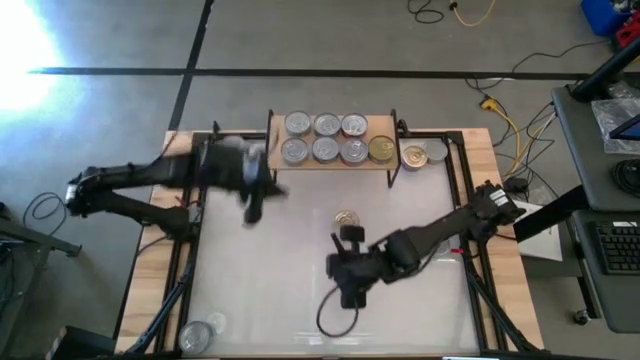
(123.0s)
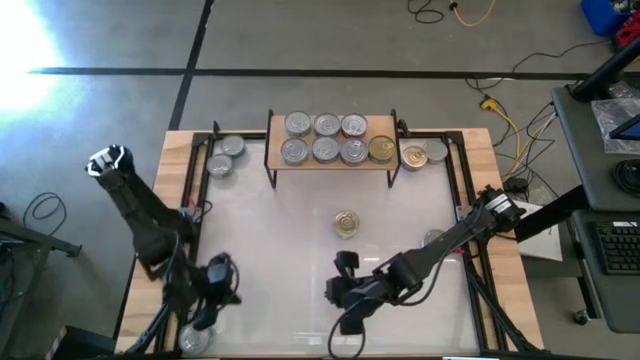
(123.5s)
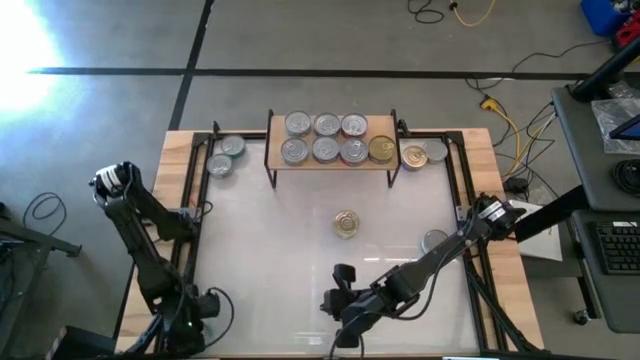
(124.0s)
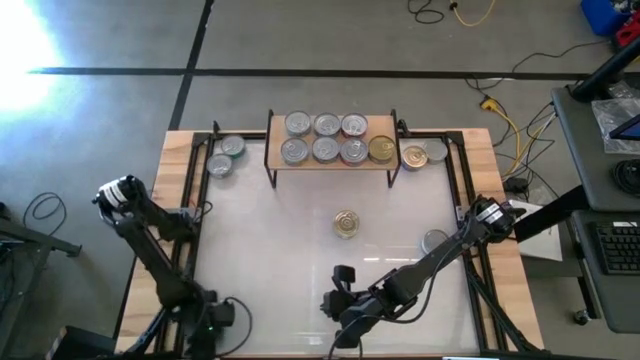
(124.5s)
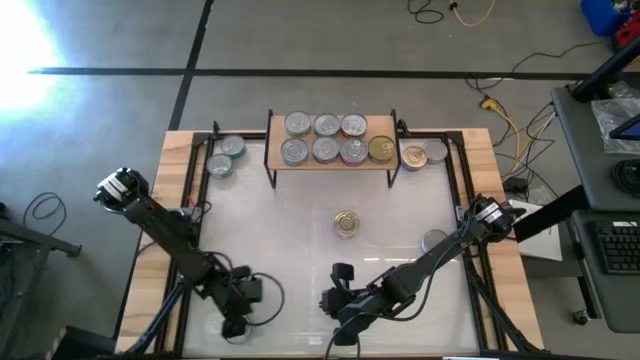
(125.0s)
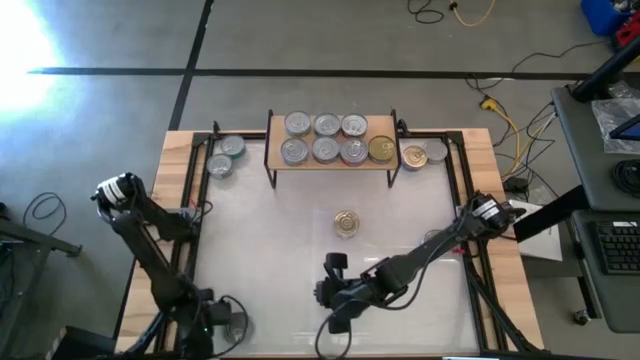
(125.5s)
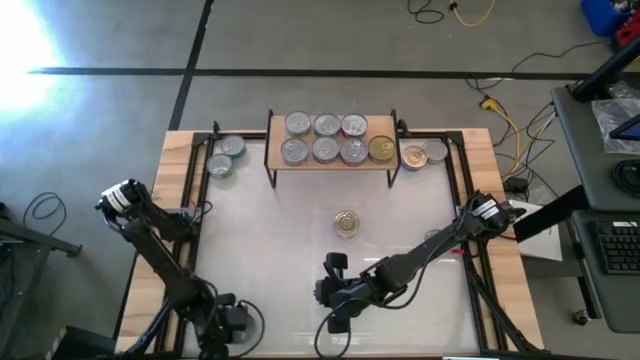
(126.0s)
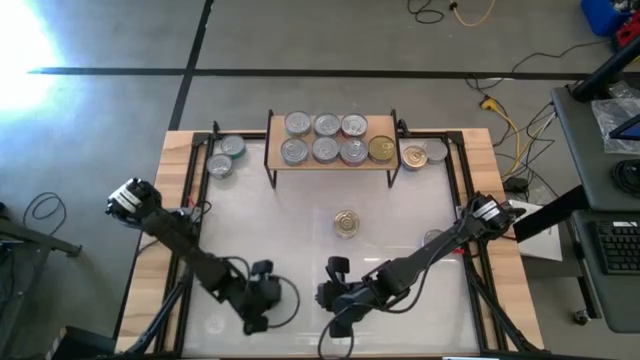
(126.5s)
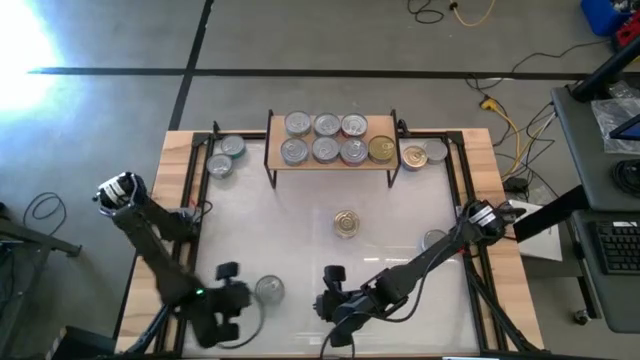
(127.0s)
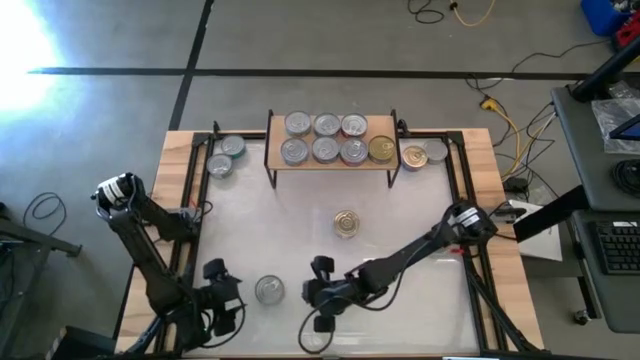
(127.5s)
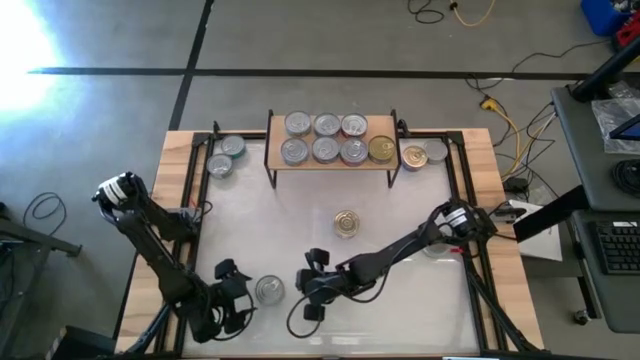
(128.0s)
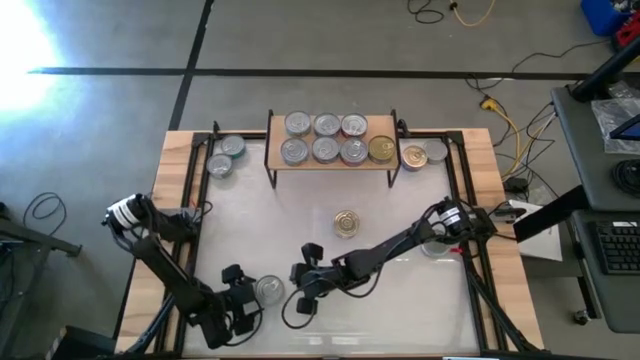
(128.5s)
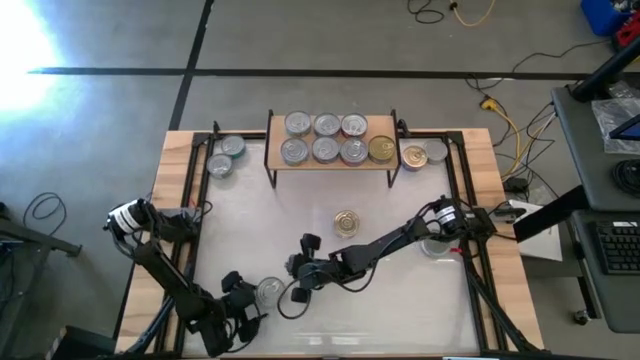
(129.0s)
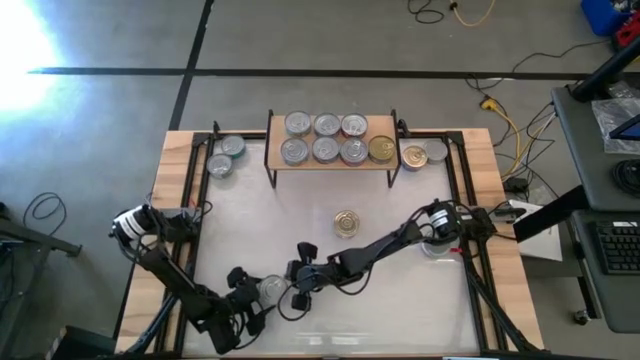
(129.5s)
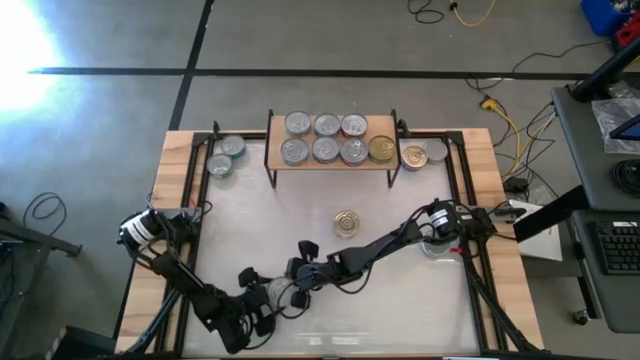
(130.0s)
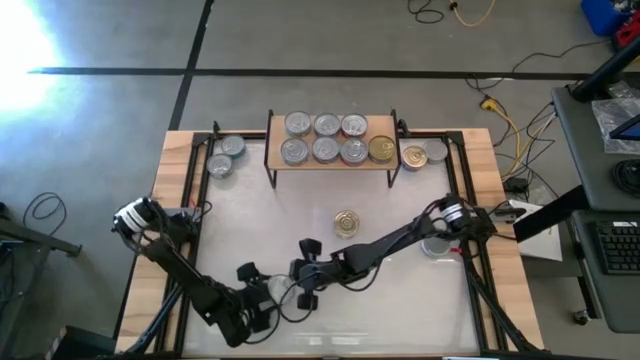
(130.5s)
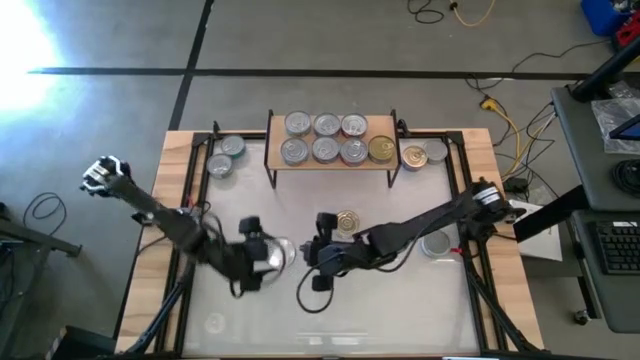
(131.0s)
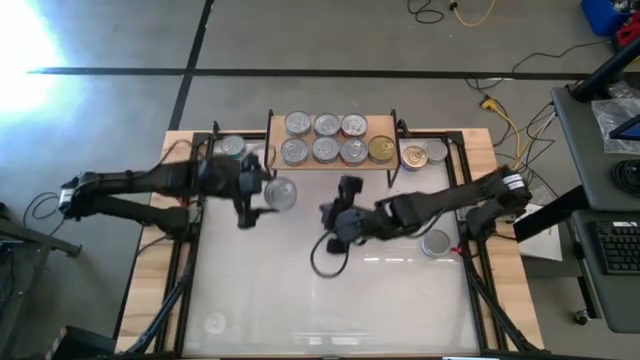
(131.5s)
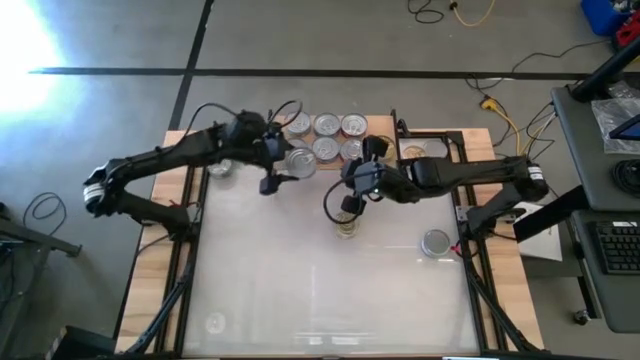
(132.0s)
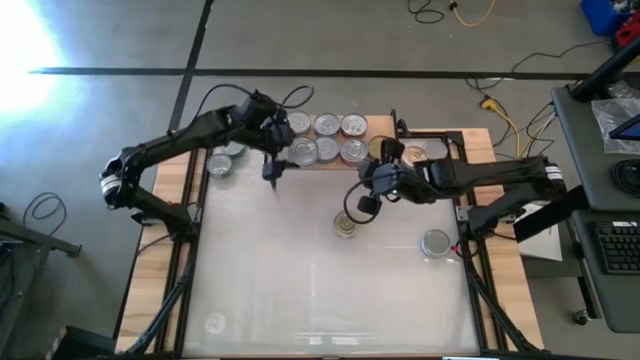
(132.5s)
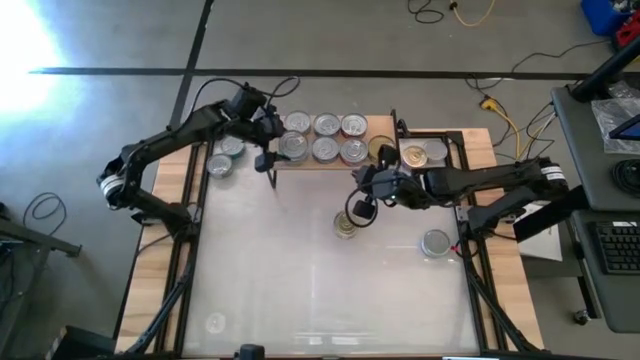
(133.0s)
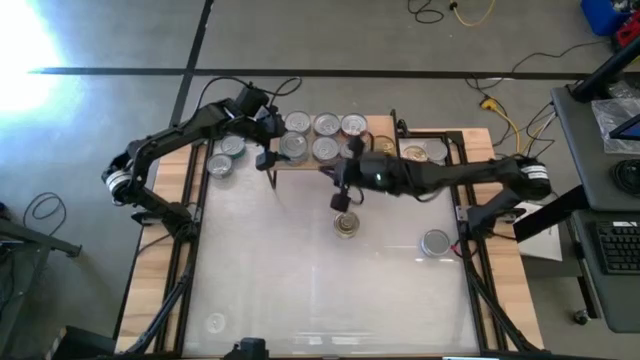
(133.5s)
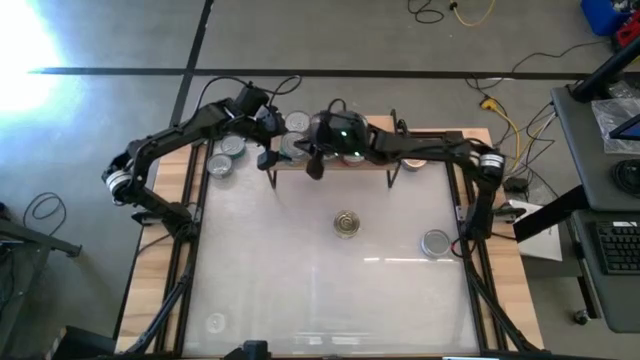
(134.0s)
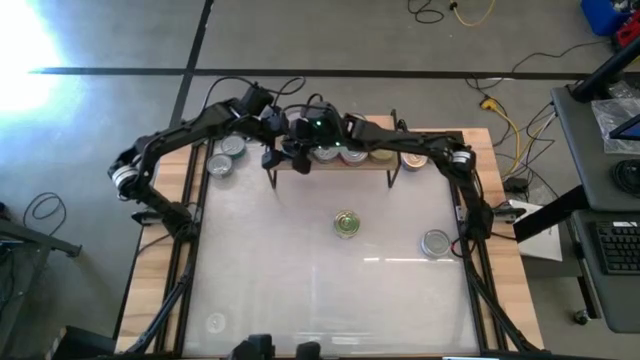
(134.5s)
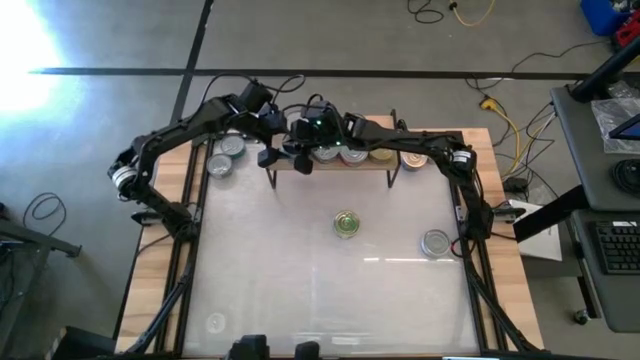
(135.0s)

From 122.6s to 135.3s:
Task: Stack canned seafood by type on shelf
Stack the bottom yellow-blue tuna can on top of the other yellow-blue tuna can on the shelf

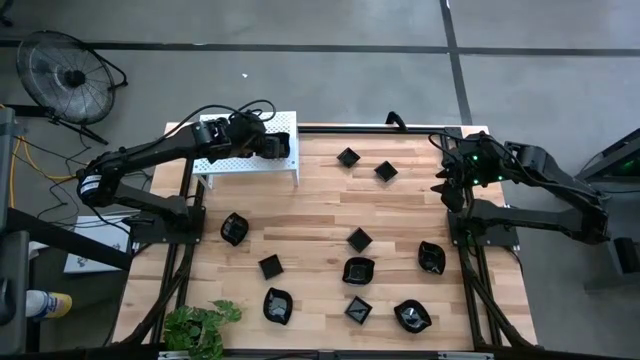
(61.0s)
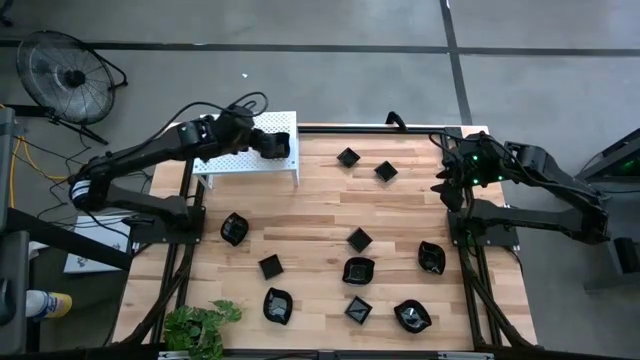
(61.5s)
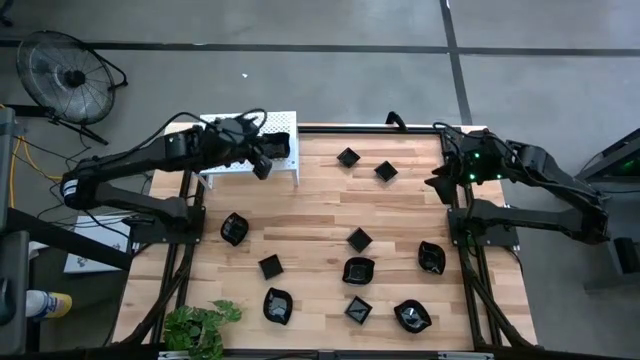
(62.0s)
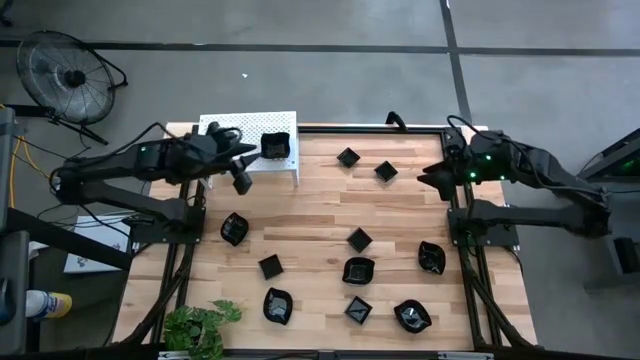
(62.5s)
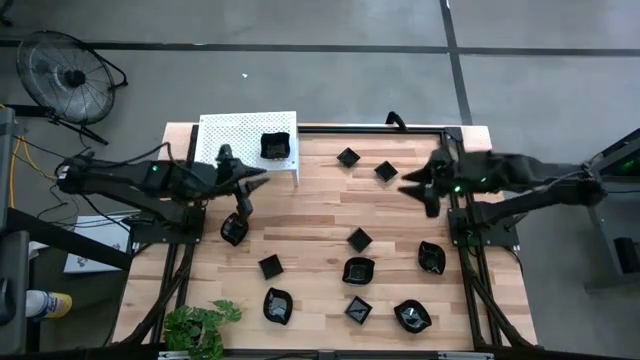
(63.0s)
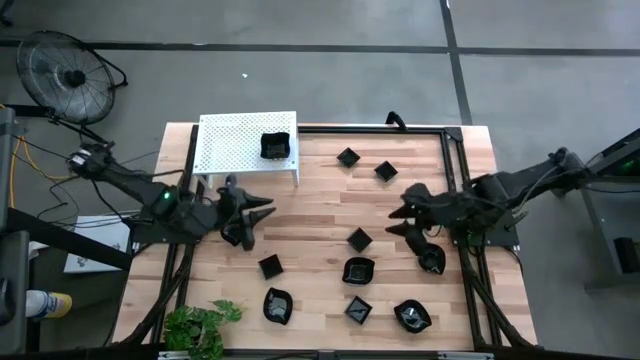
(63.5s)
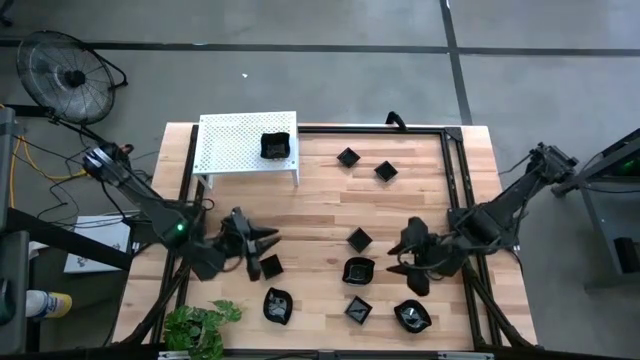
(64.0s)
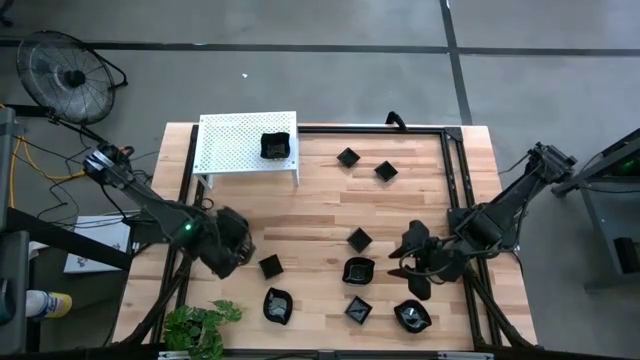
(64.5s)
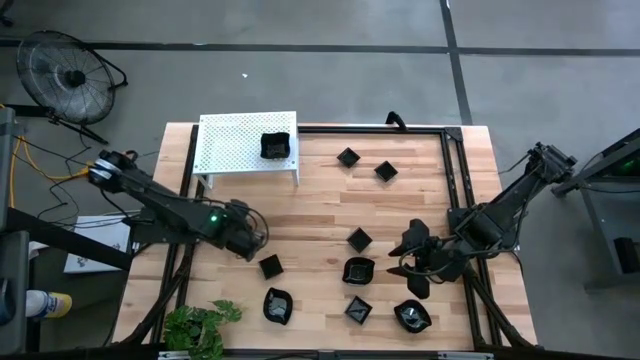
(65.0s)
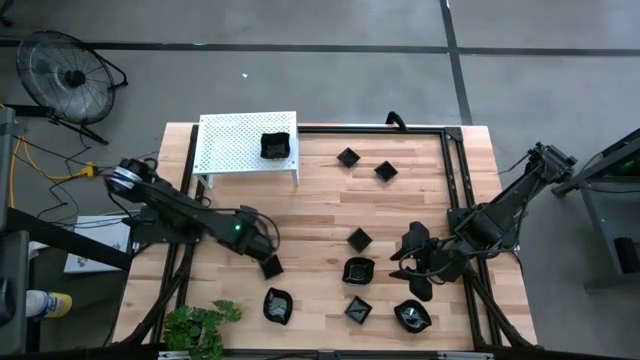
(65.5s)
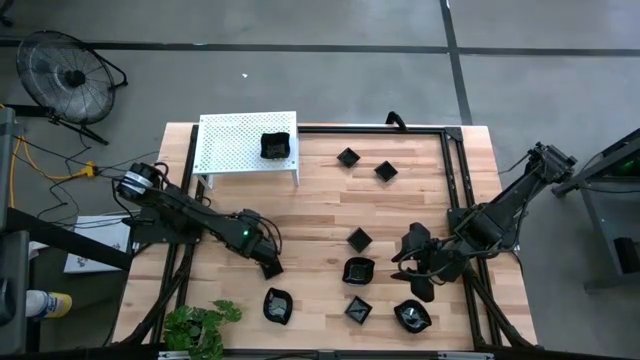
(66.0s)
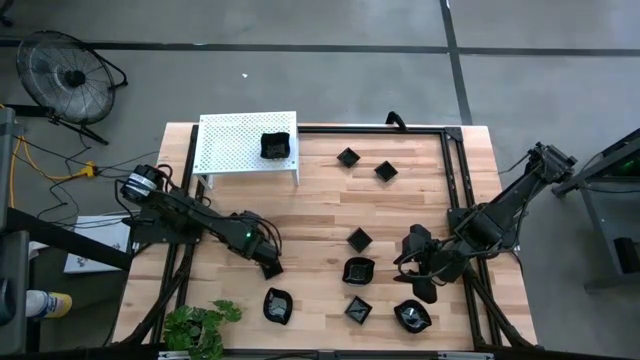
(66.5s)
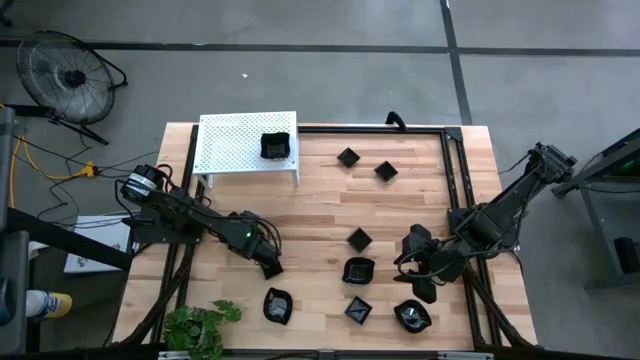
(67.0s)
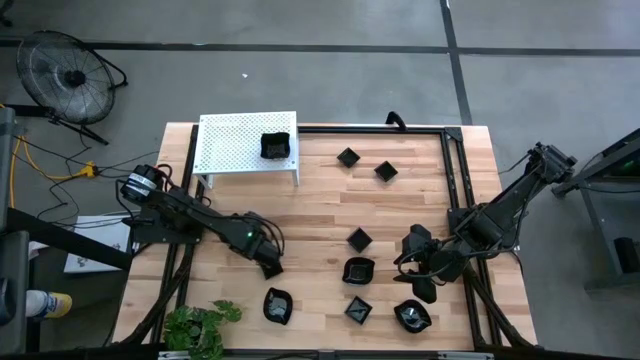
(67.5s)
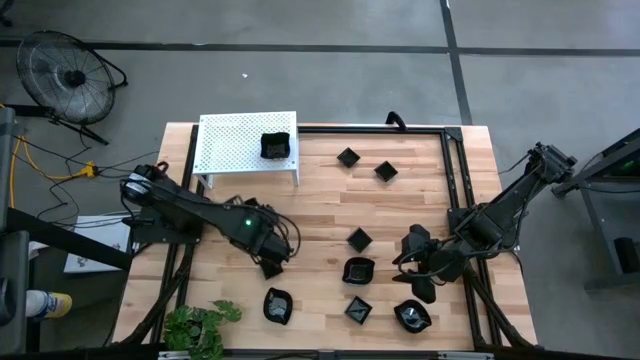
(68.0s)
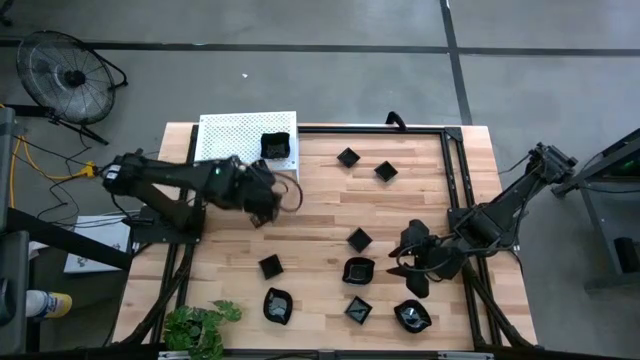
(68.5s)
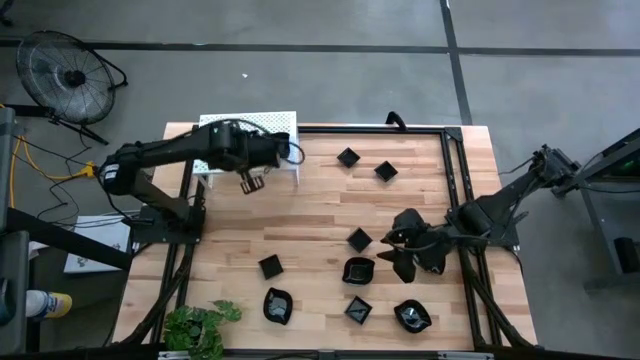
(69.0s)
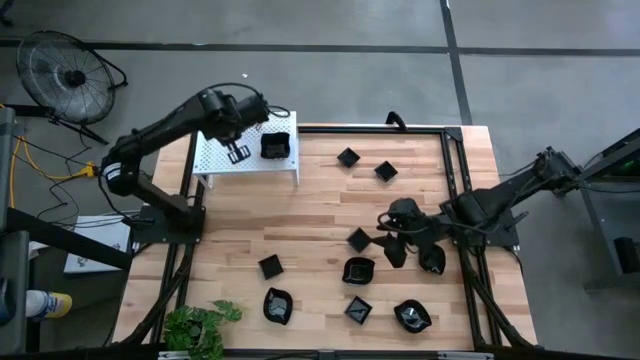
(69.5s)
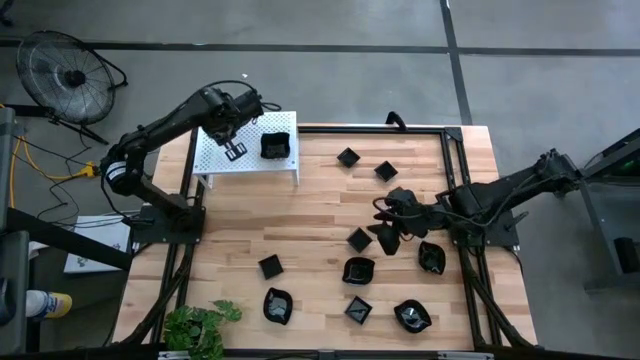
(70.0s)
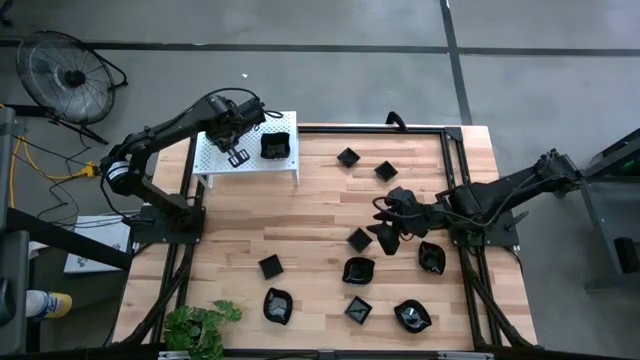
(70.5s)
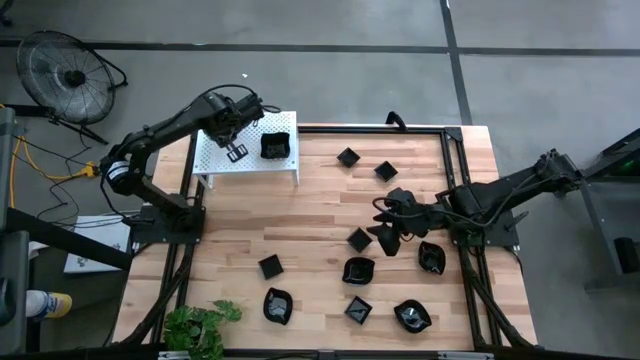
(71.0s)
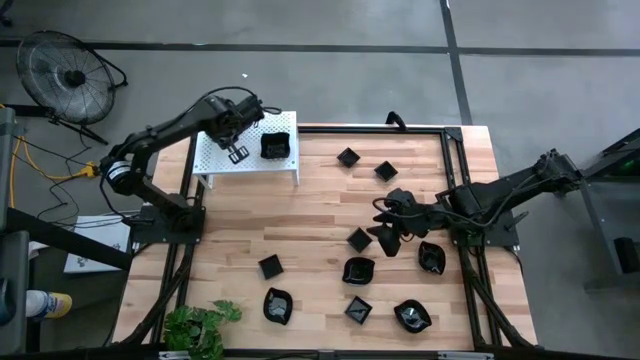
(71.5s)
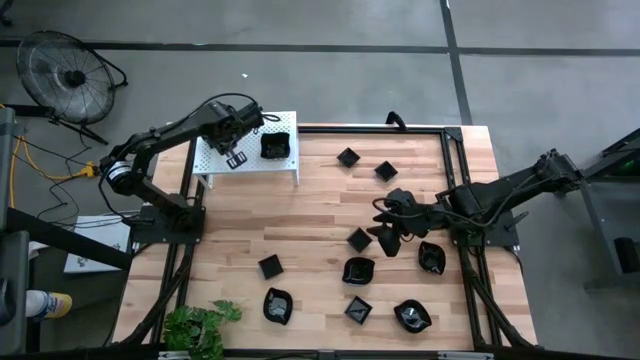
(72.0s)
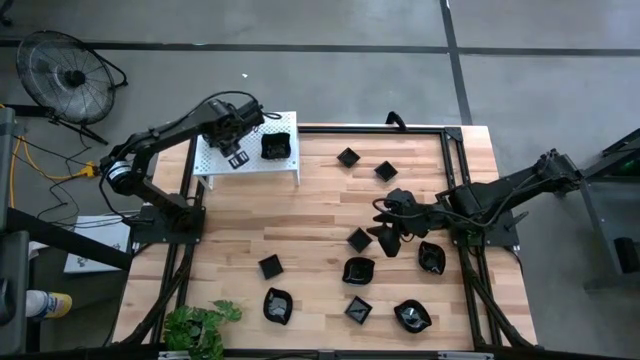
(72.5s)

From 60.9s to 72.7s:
Task: Pick & Place Mini shaped plates
Put the black leaf-shaped plate on the shelf
